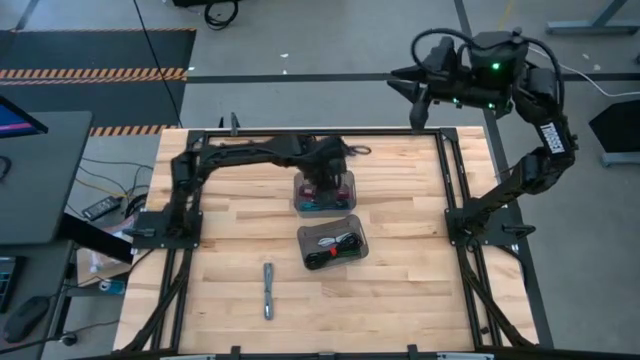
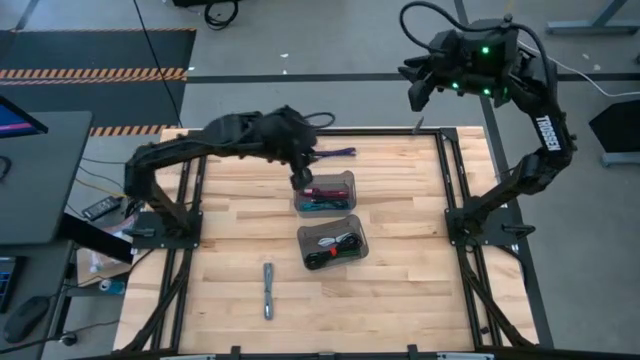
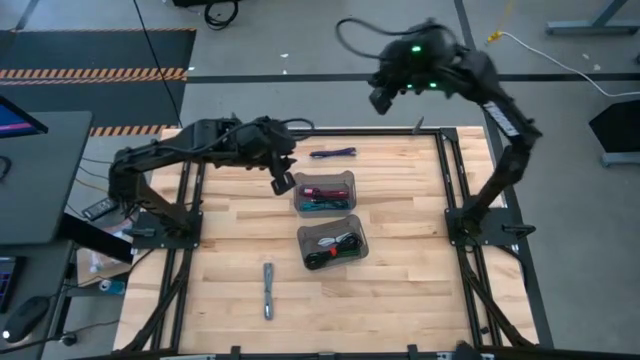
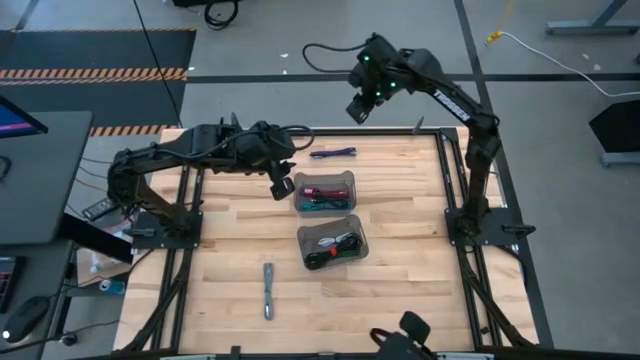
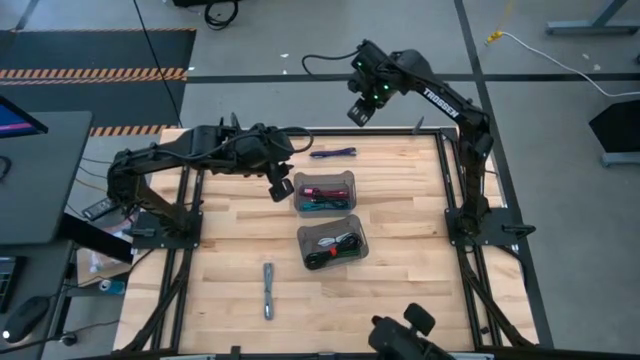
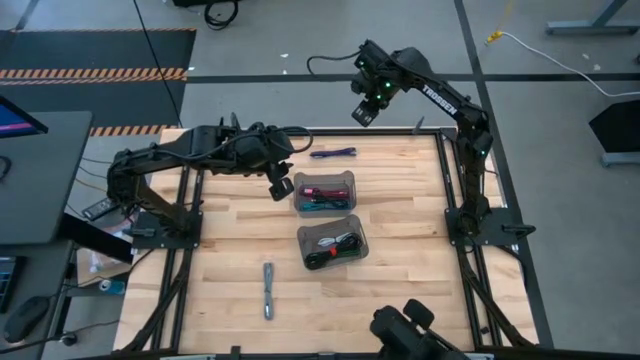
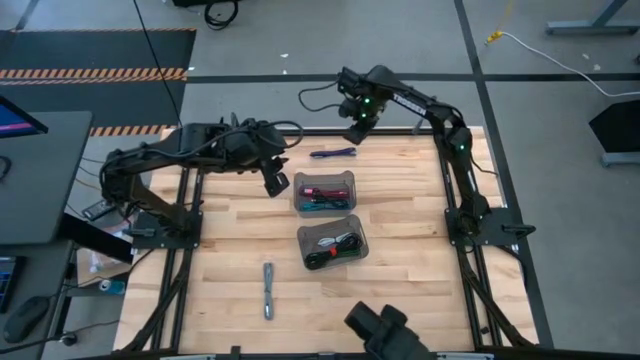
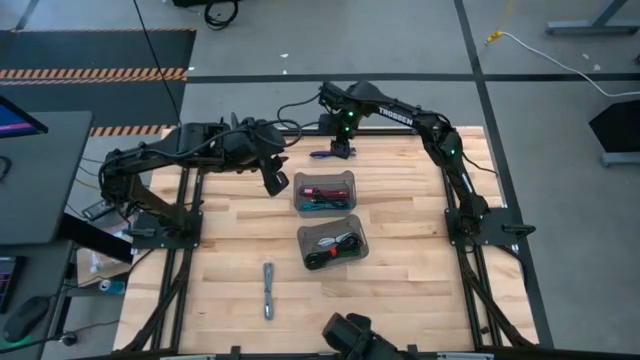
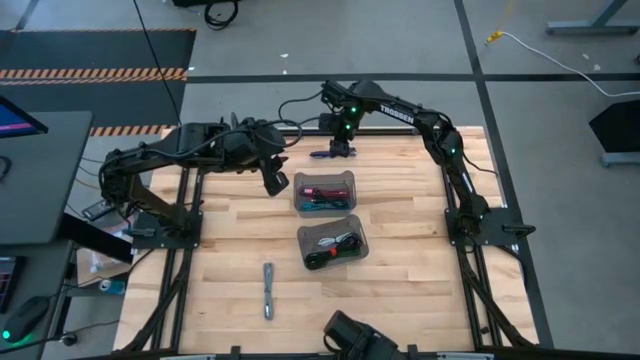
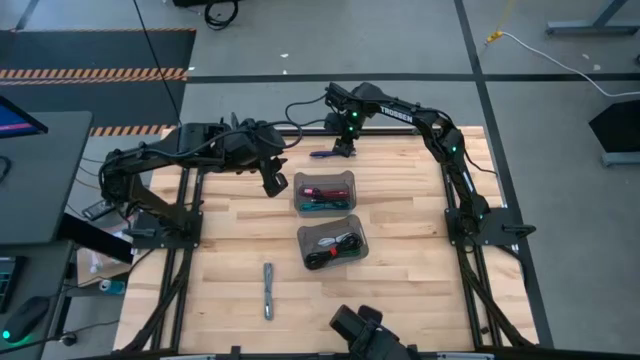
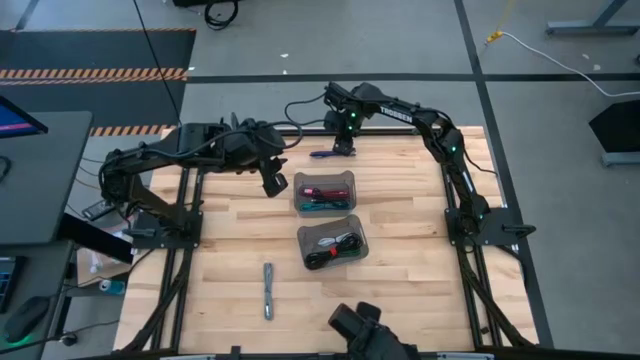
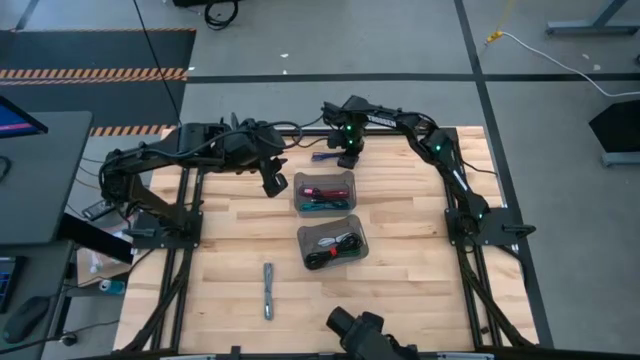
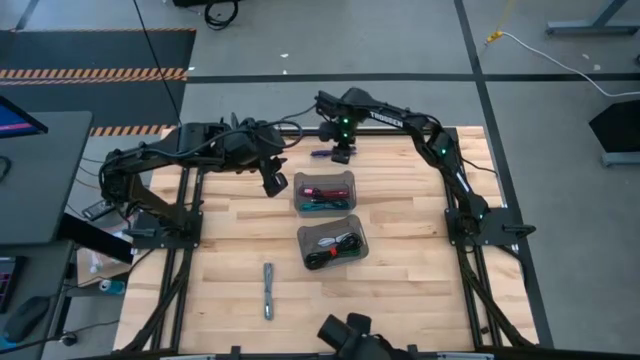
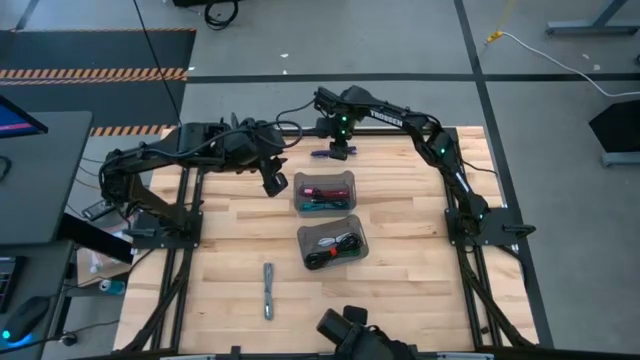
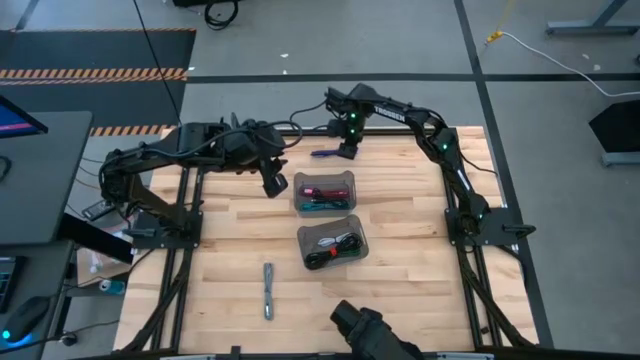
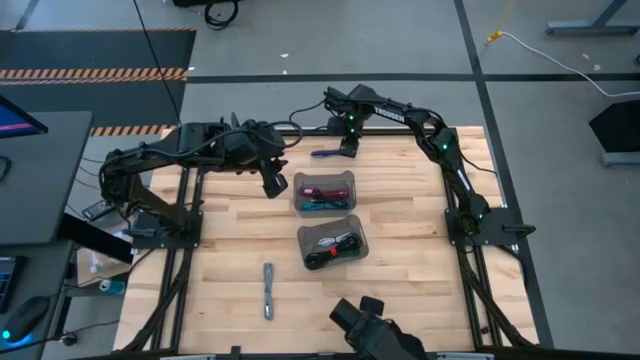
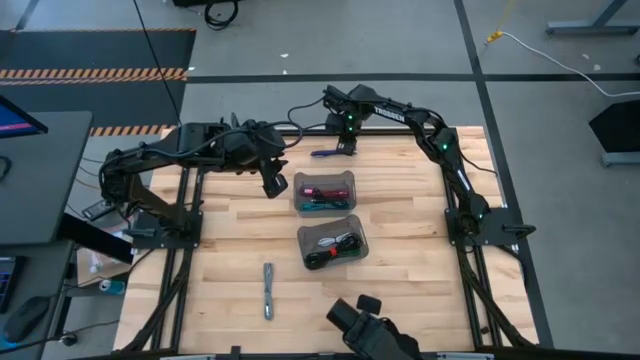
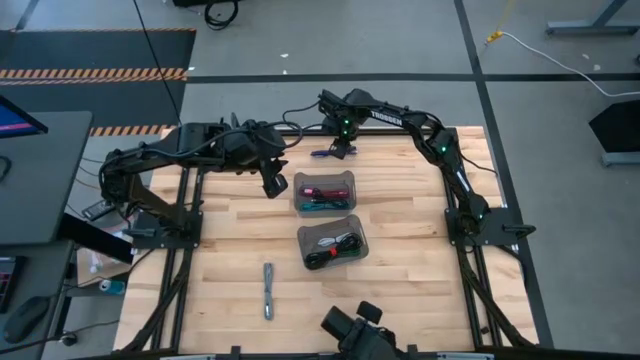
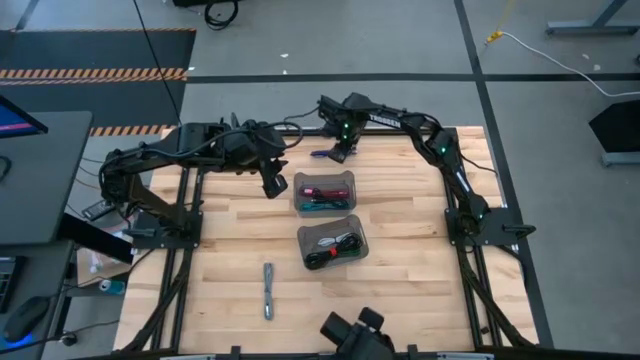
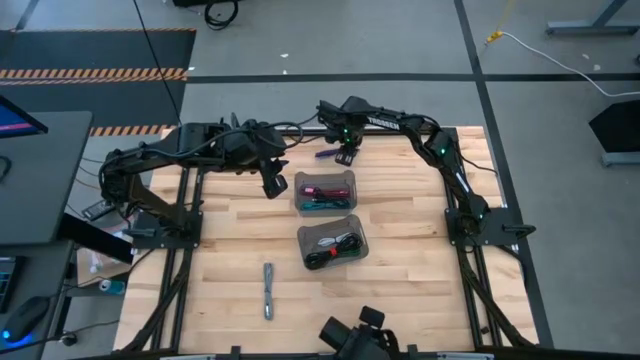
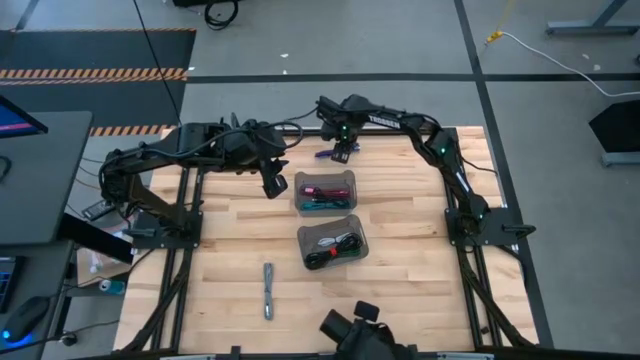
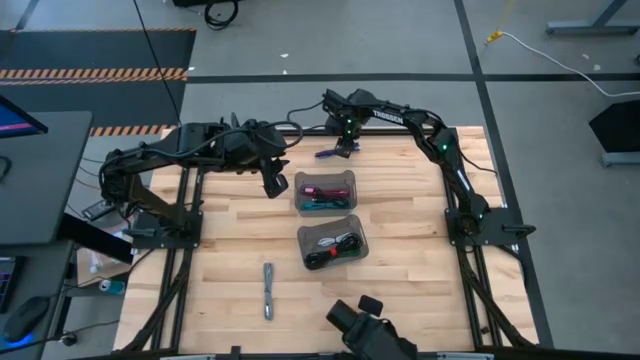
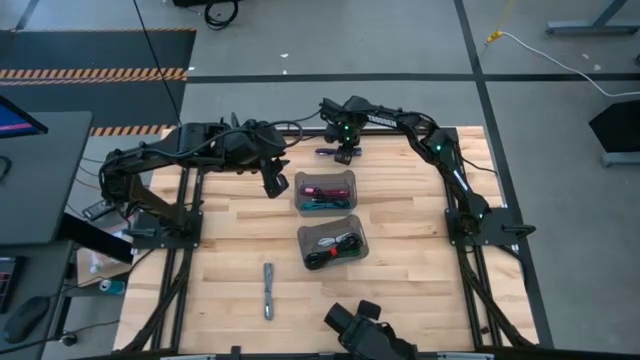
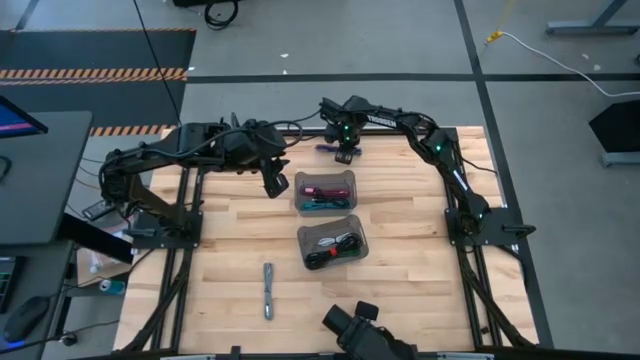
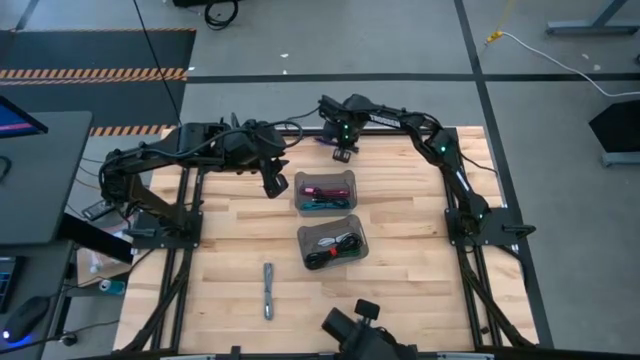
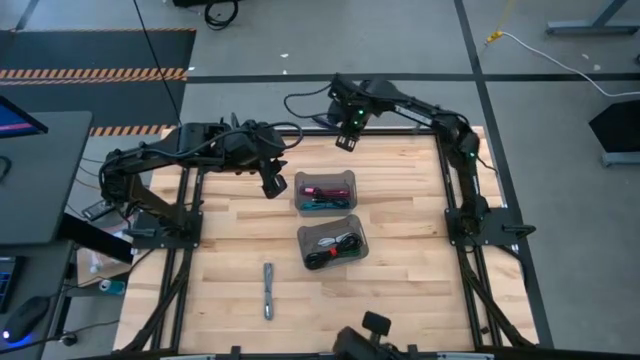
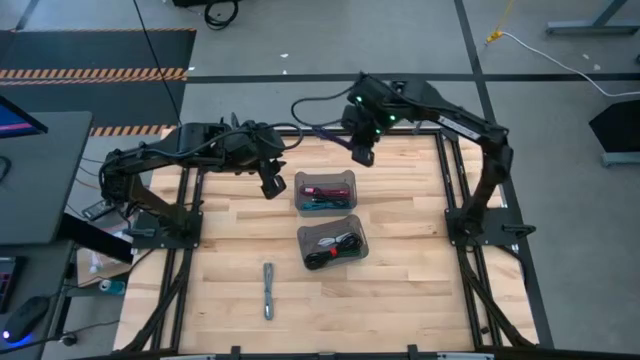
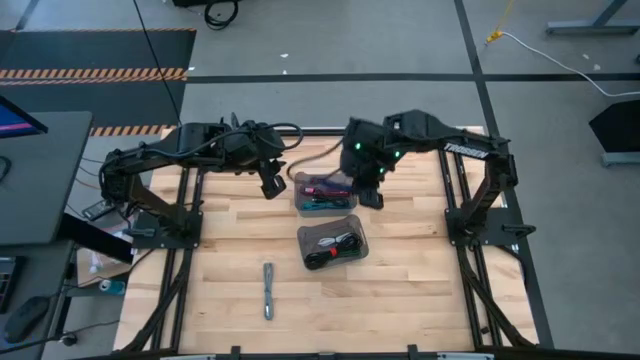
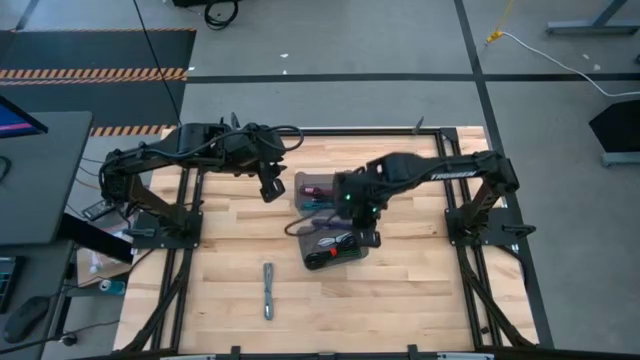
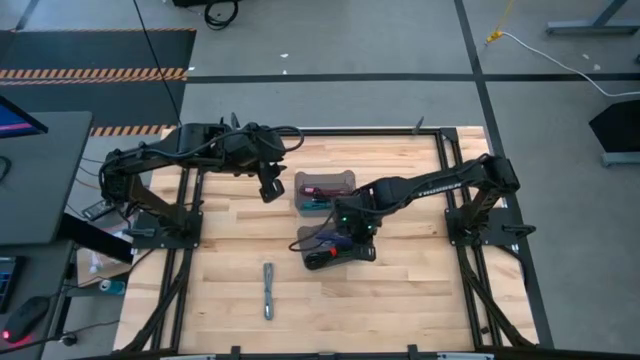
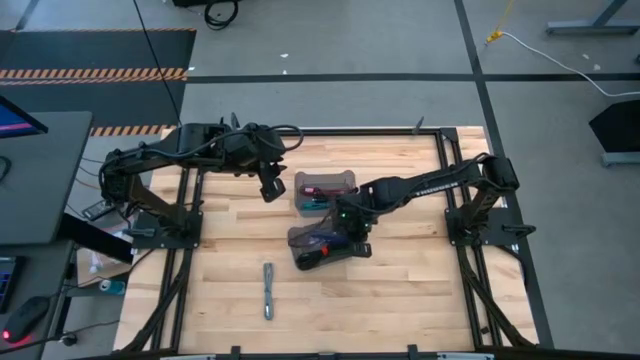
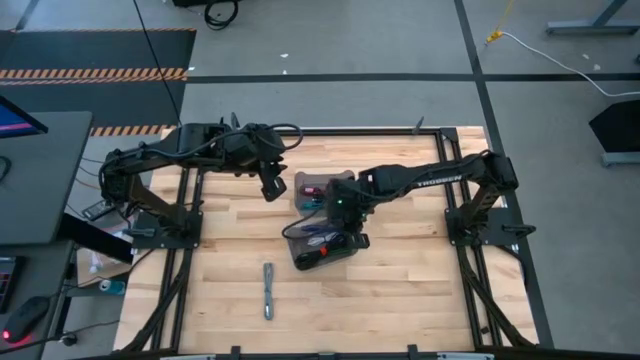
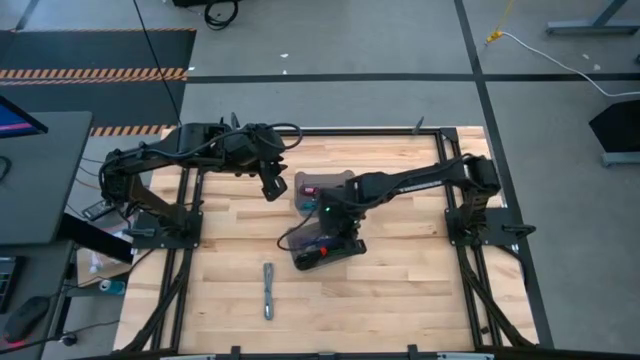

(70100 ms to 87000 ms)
Task: Pick and place USB-C Cables
Put the violet charger cable into the bottom black transparent bin

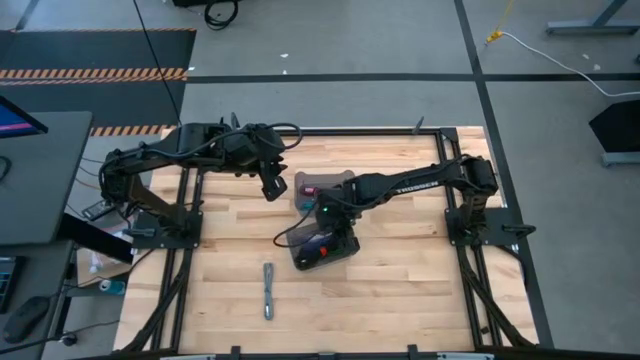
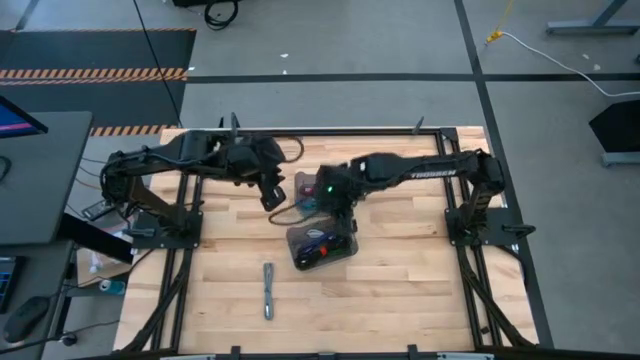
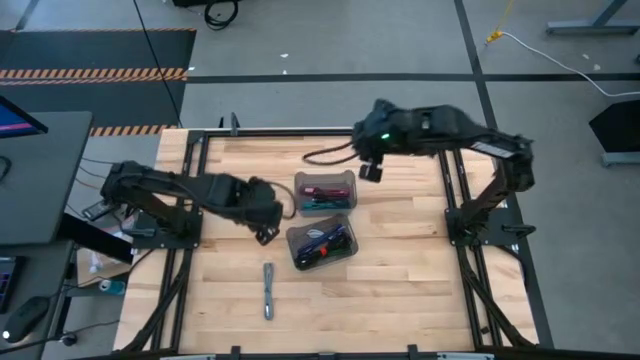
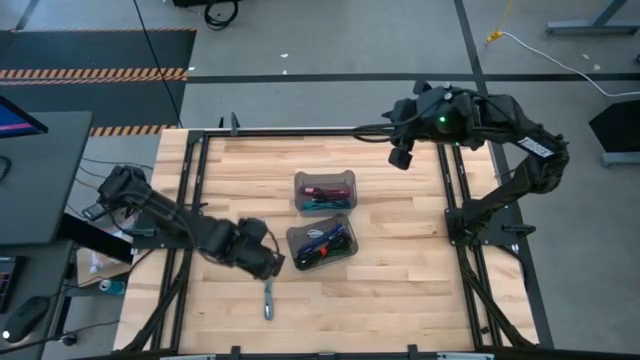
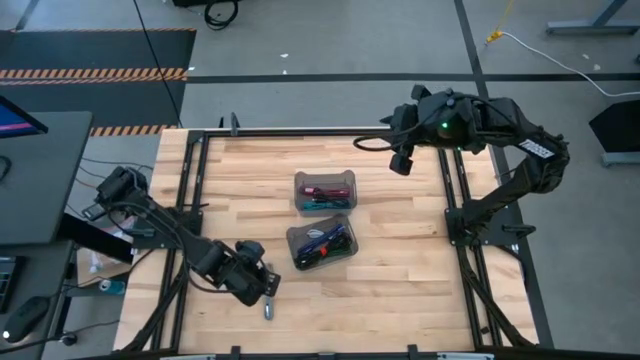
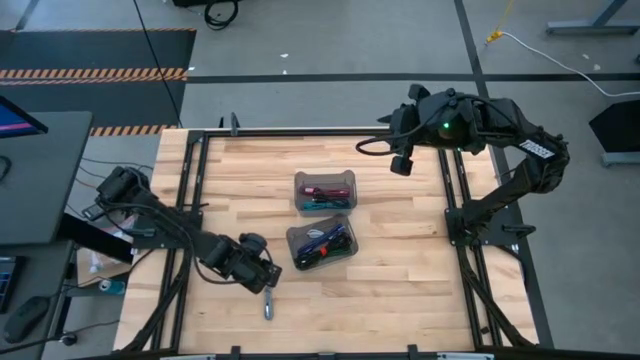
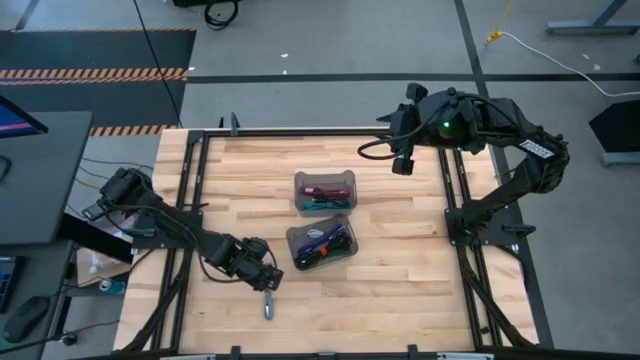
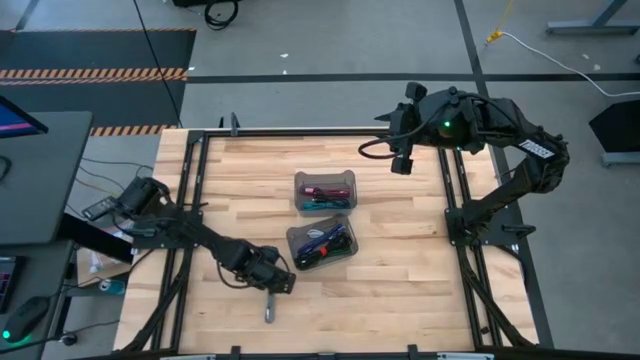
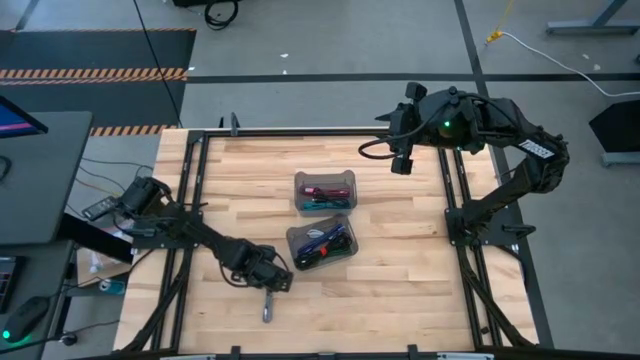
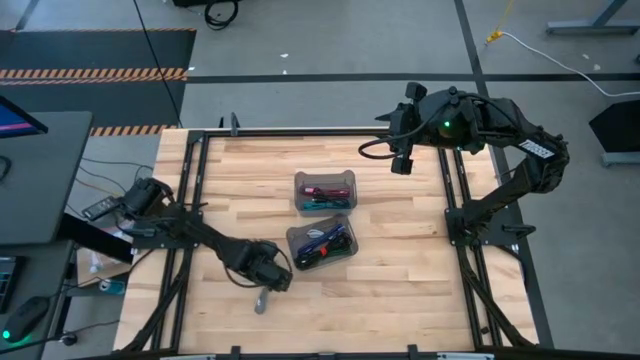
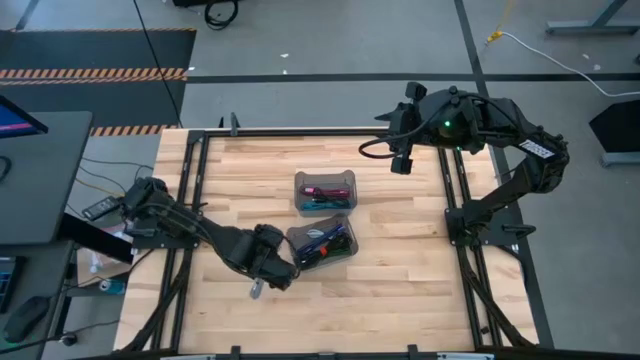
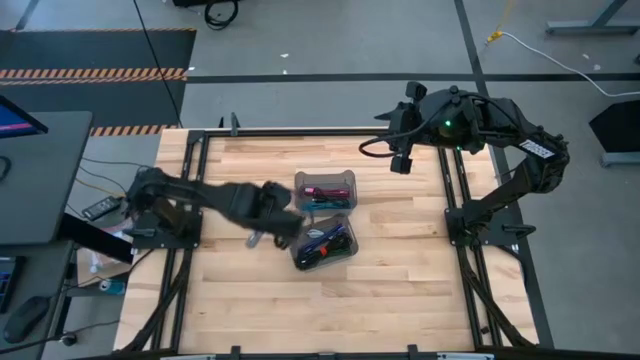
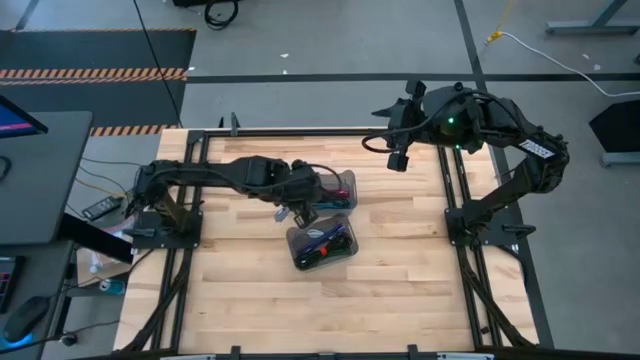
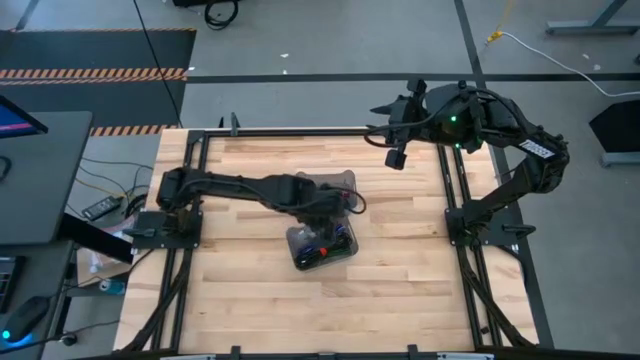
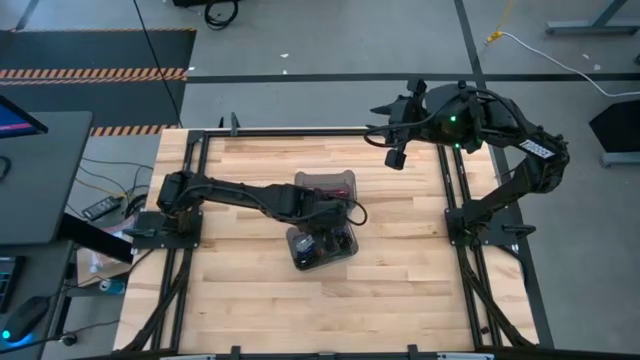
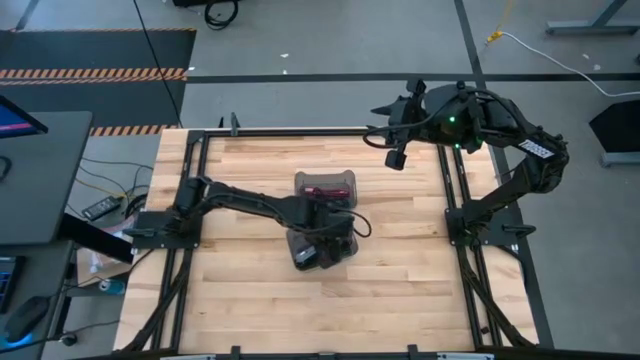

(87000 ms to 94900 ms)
Put the gray charger cable into the bottom black transparent bin
